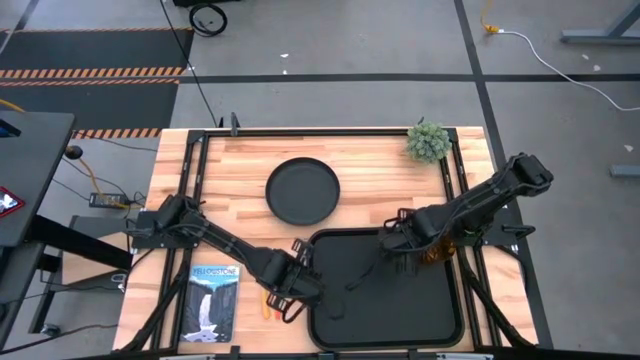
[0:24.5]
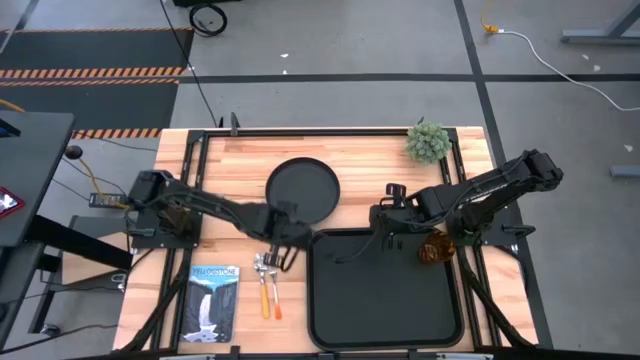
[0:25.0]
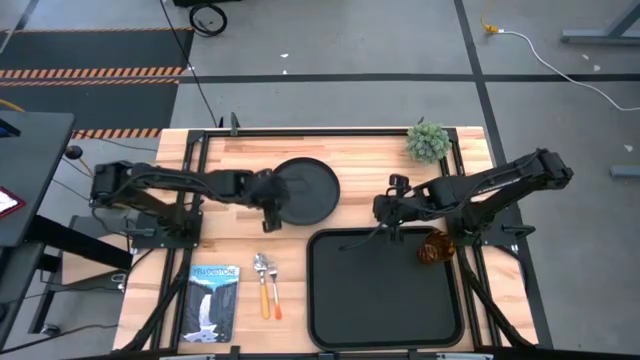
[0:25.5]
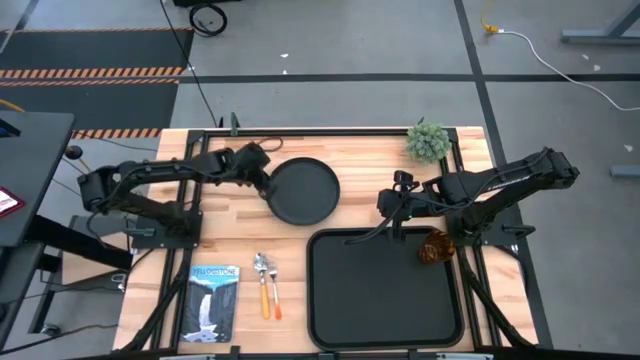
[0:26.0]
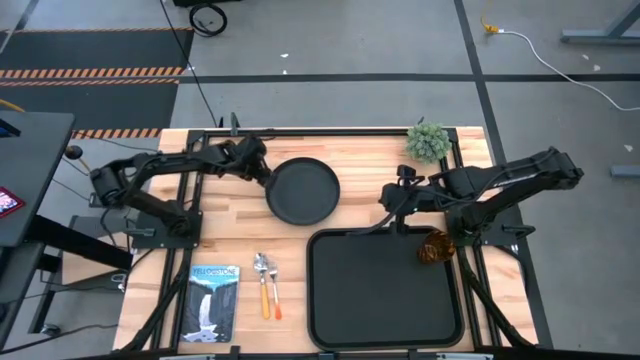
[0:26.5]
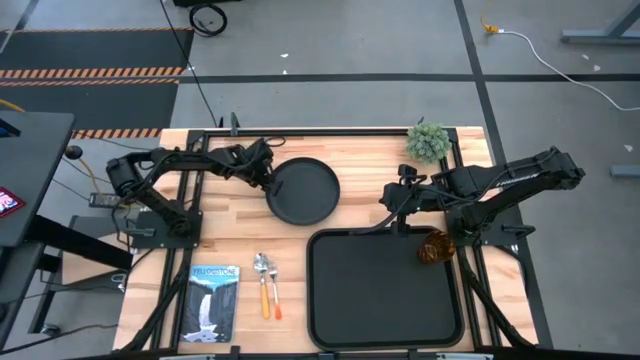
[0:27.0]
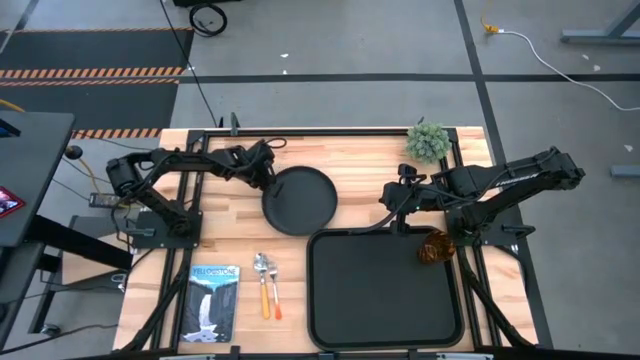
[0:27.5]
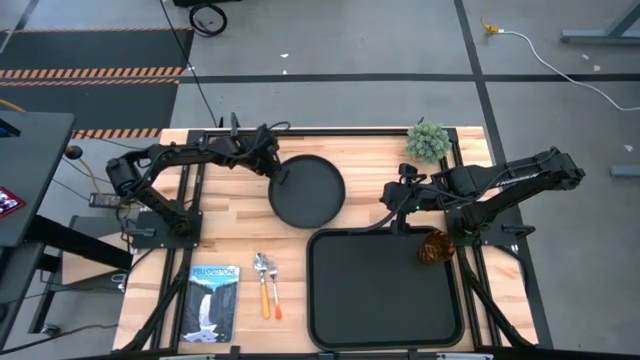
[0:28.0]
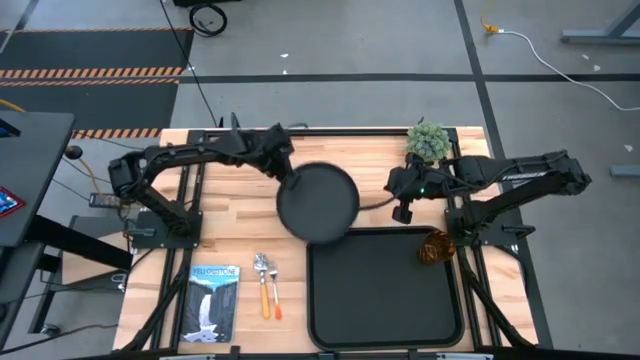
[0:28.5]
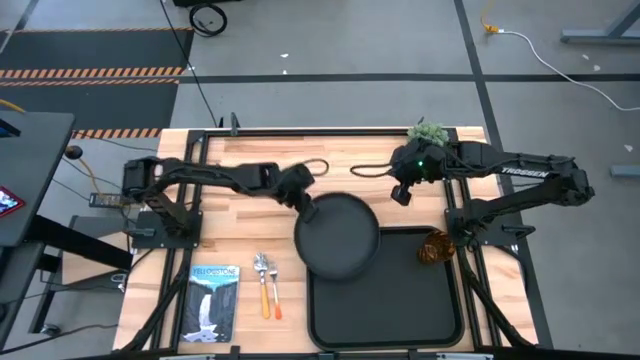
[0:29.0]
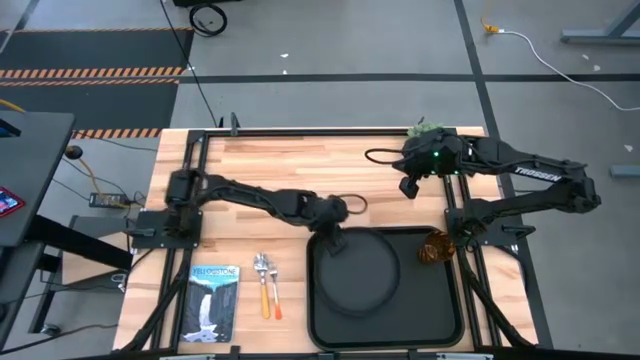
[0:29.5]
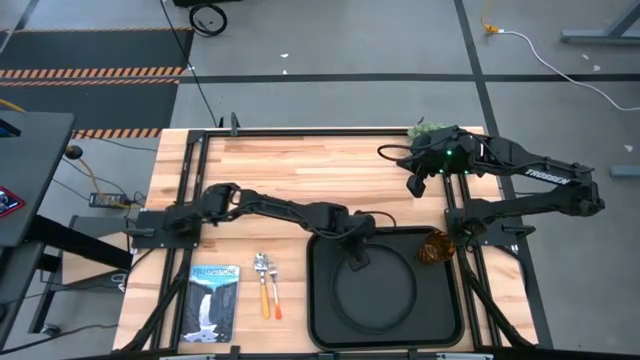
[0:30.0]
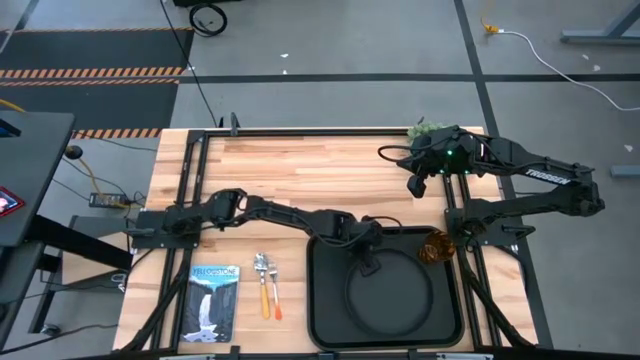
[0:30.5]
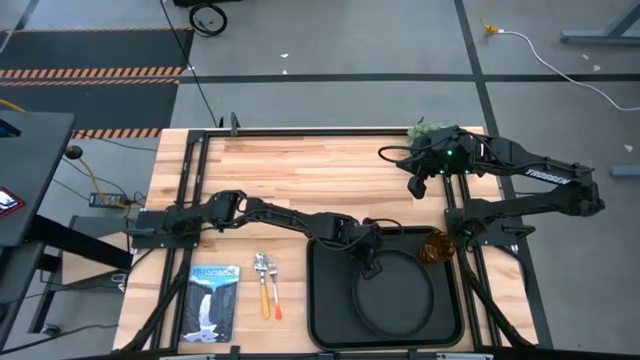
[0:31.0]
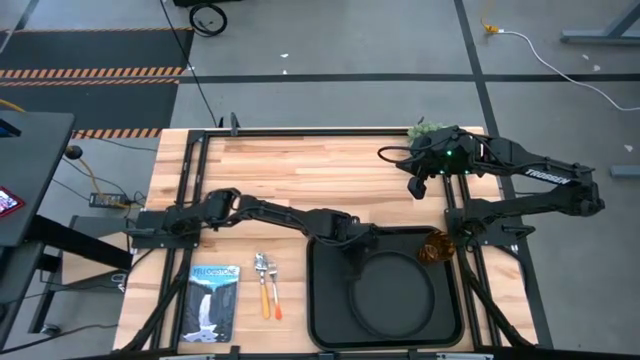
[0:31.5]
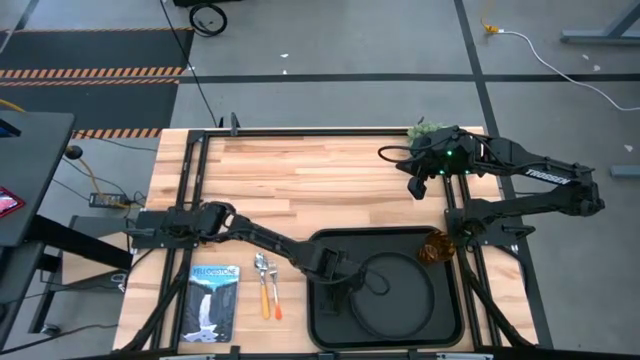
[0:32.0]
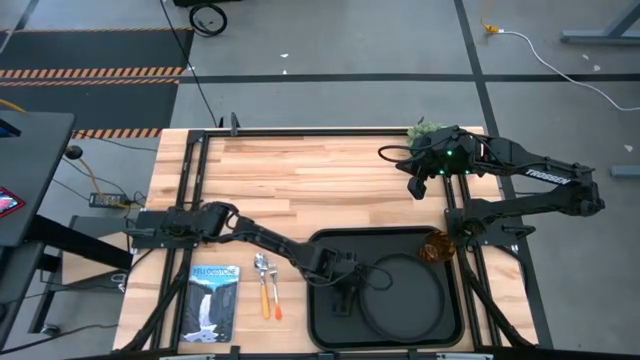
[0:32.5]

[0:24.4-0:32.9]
Task: Pick and place plate/cup/fork/spoon on tray
Put the black plate on the black tray

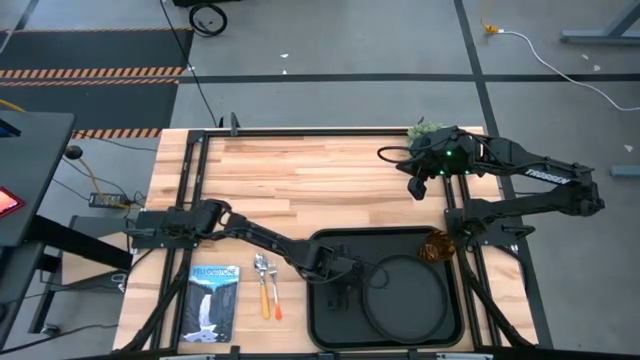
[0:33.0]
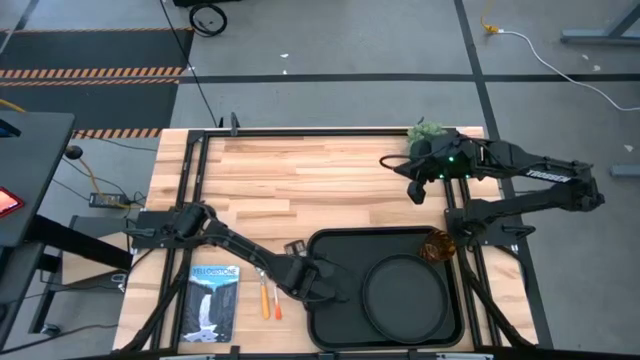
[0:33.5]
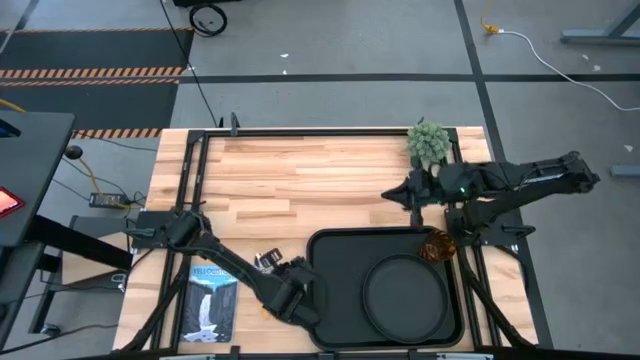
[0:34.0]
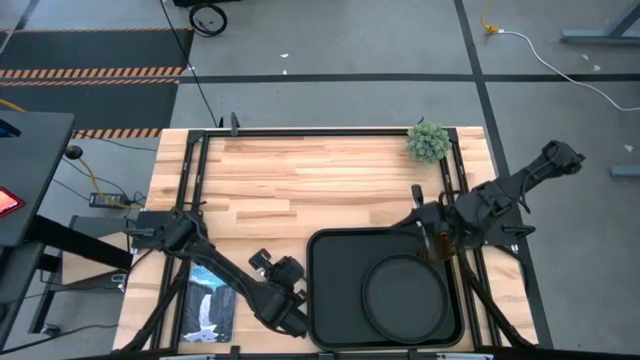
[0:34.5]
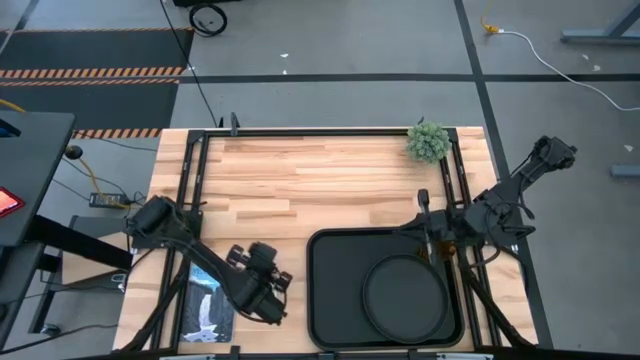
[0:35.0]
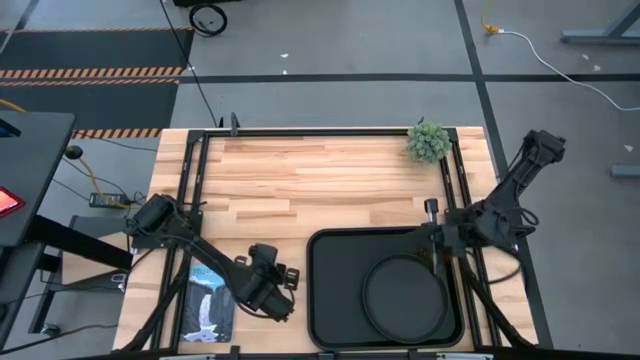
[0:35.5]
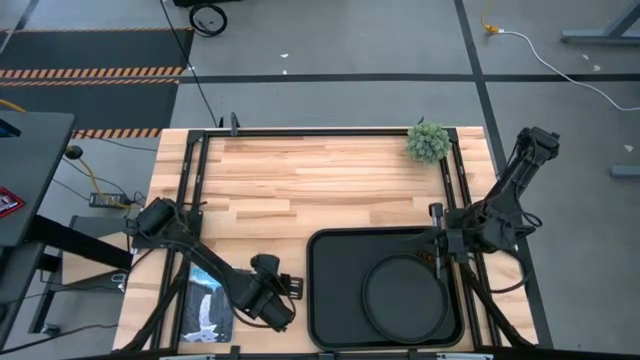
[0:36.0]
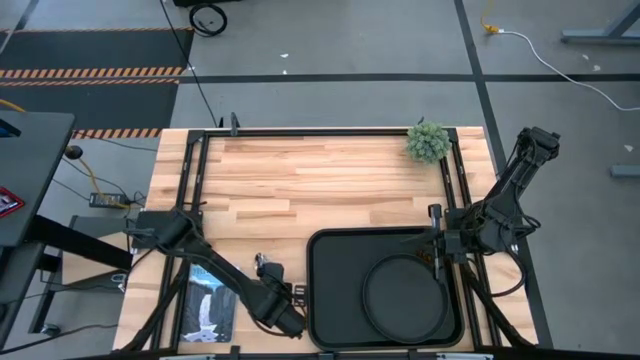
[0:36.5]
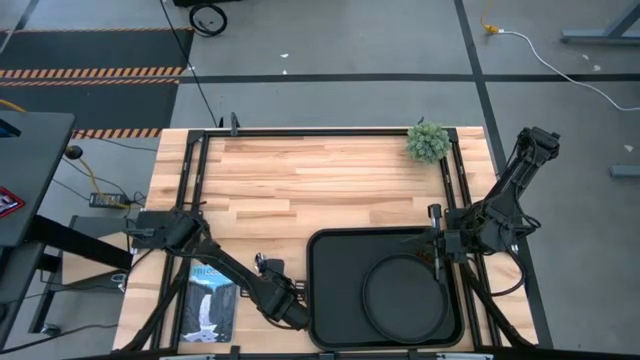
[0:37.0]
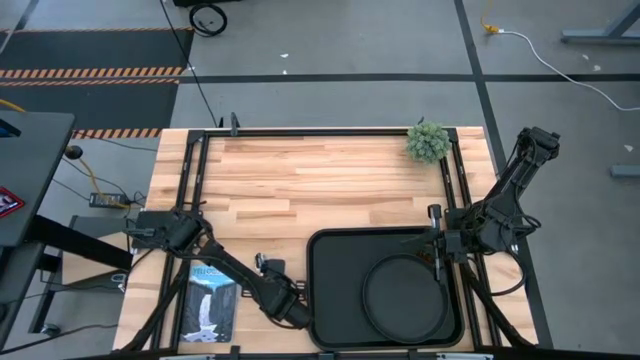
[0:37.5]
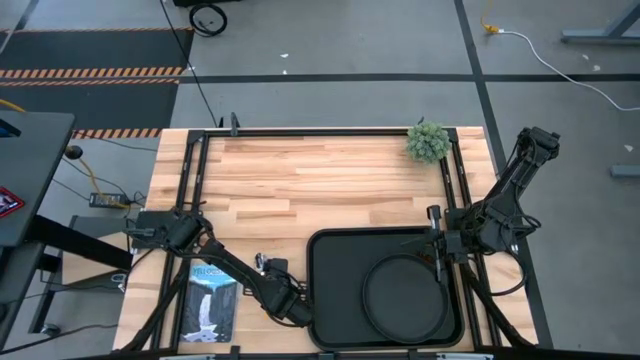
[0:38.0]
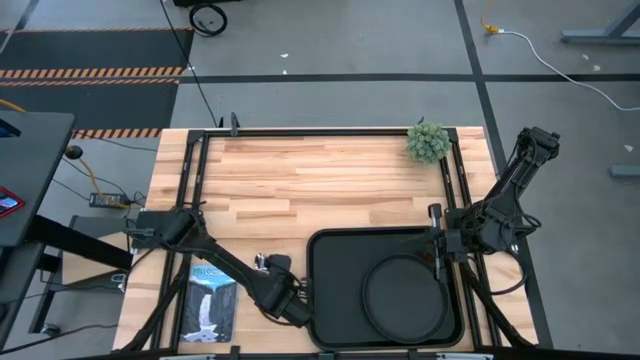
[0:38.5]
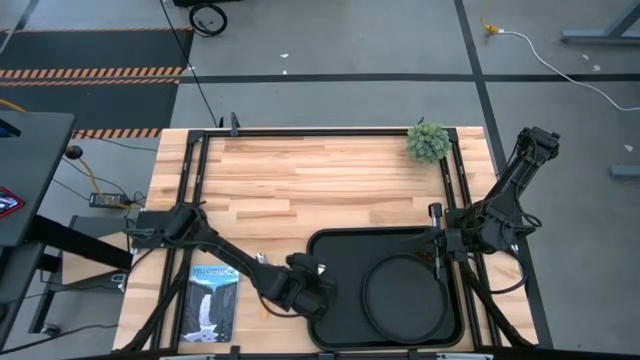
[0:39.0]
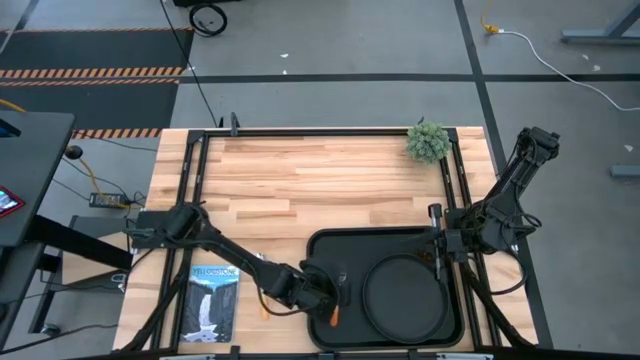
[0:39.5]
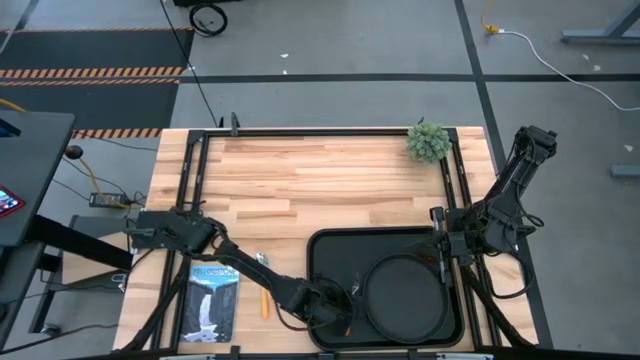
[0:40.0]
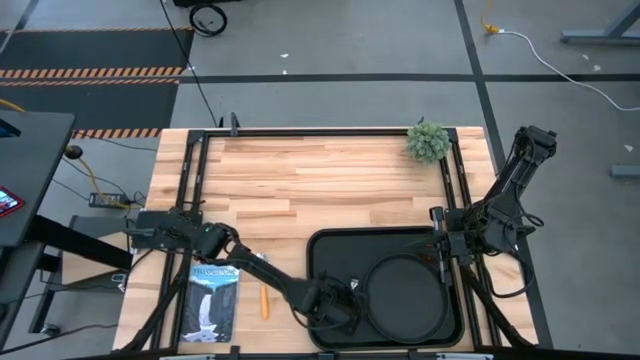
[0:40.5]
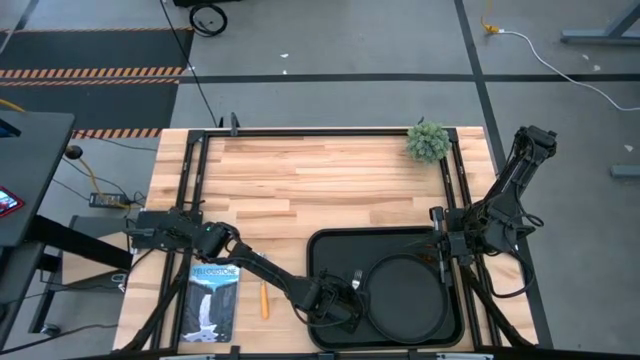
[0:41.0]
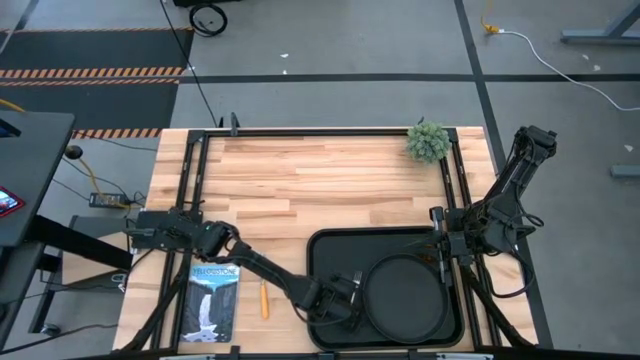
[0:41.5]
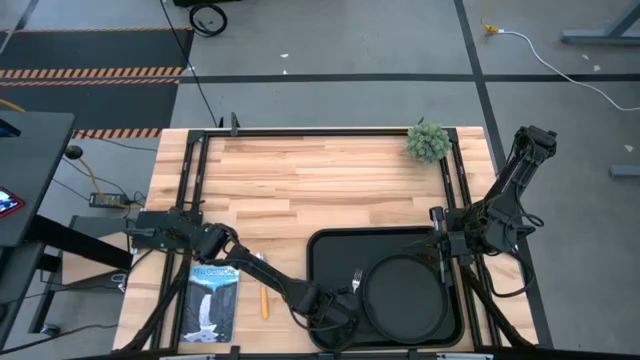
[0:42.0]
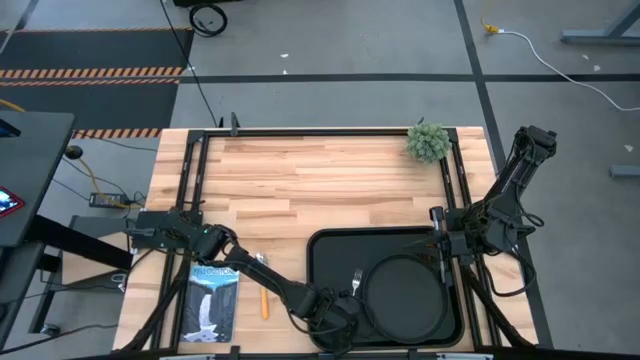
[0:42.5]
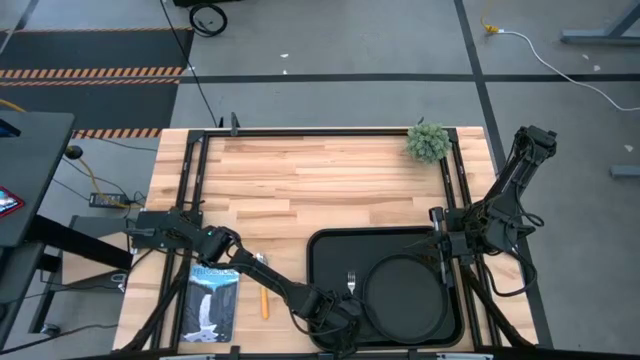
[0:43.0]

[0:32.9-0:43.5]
Put the orange fork on the black tray to the left of the black plate

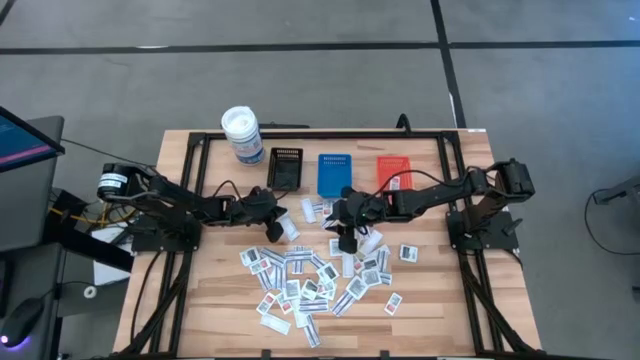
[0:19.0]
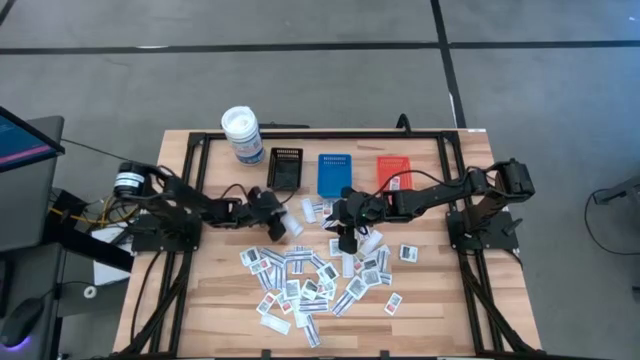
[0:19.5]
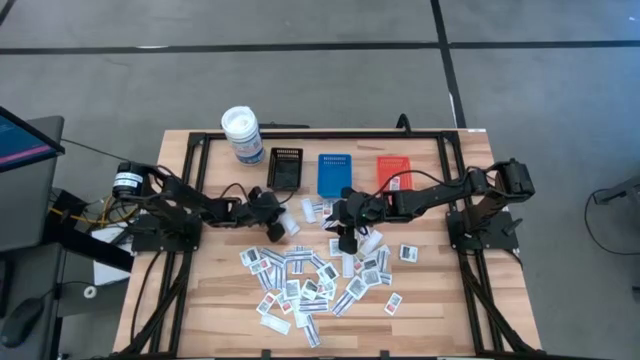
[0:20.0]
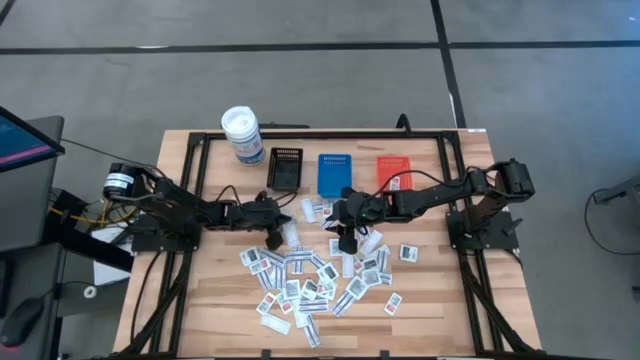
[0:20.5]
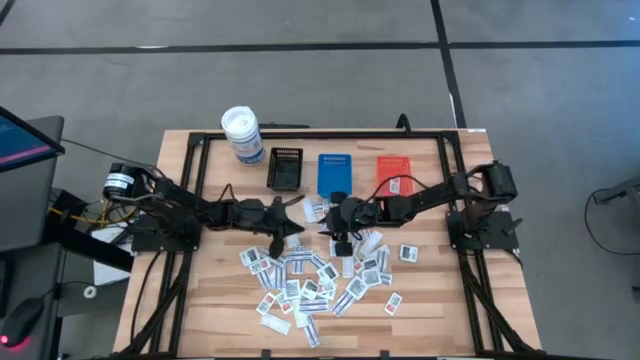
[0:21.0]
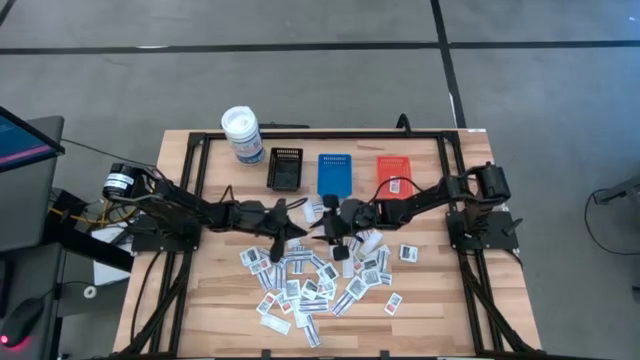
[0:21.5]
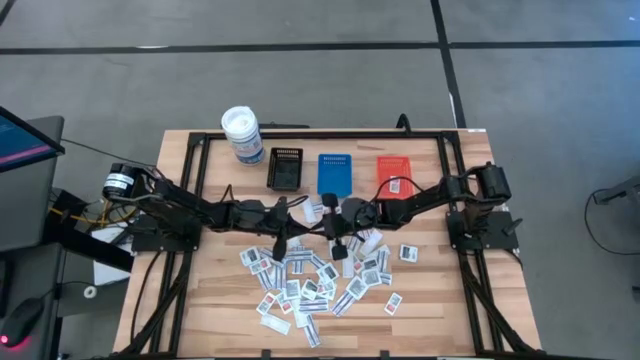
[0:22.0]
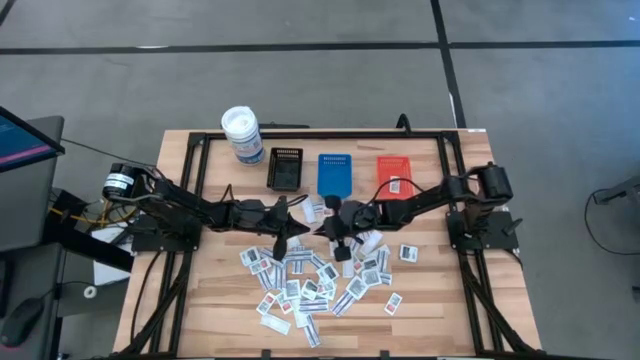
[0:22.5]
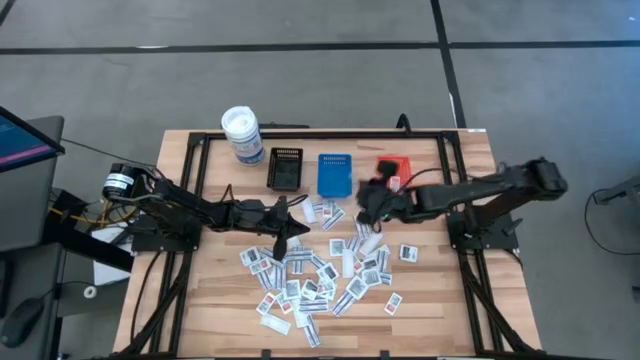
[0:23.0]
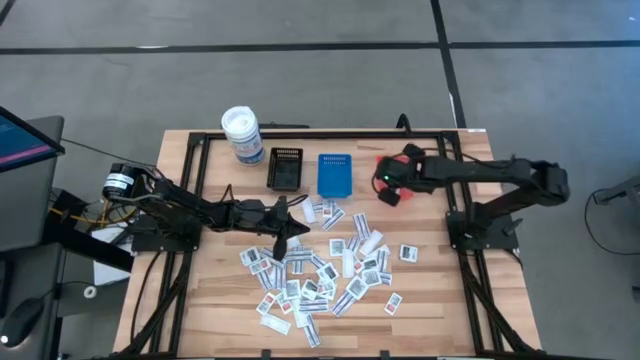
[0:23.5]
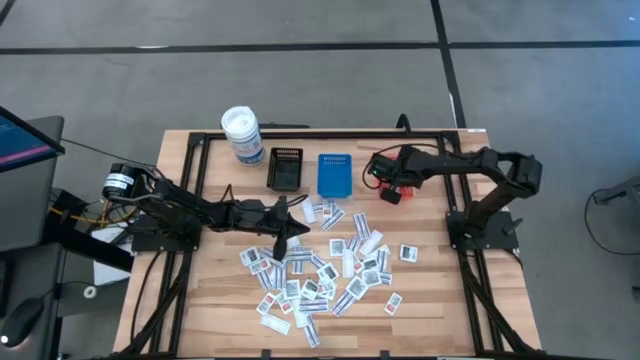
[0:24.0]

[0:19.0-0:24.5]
Task: Pick & Place First Aid Supplies
Put the orange ointment pack into the orange bin
